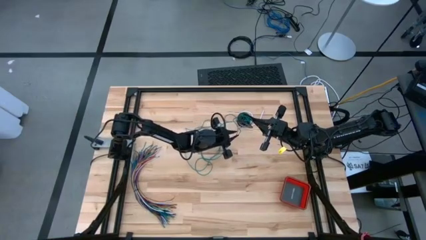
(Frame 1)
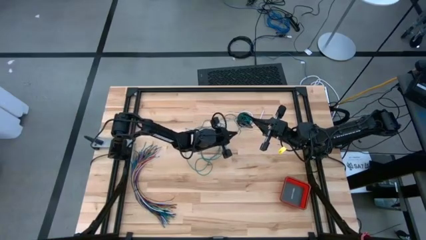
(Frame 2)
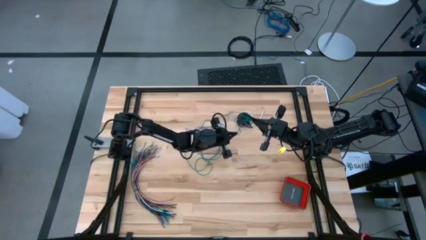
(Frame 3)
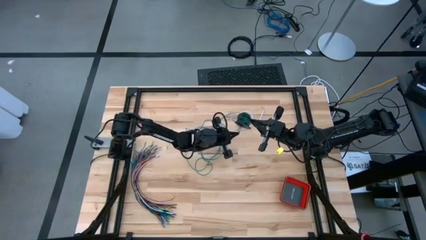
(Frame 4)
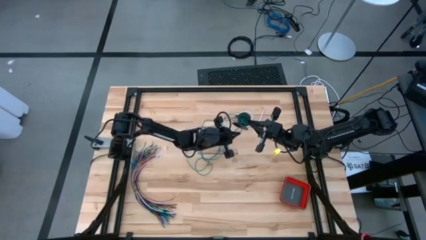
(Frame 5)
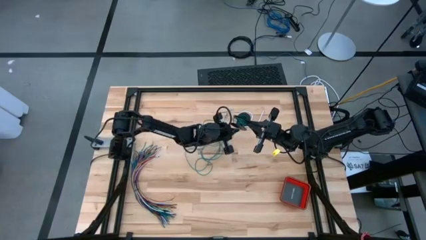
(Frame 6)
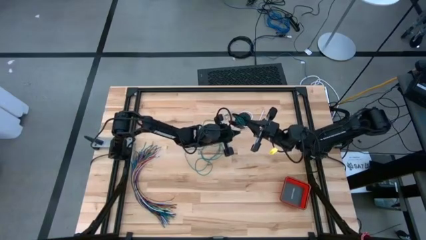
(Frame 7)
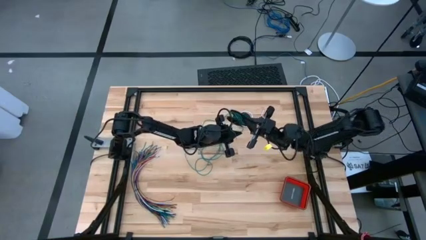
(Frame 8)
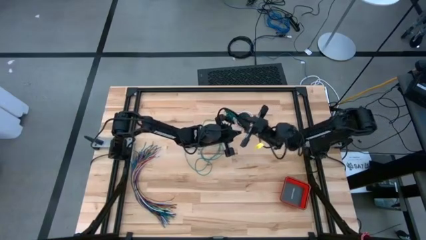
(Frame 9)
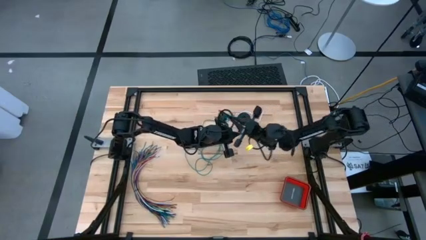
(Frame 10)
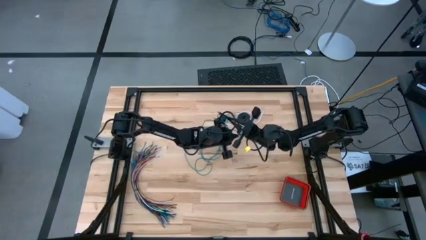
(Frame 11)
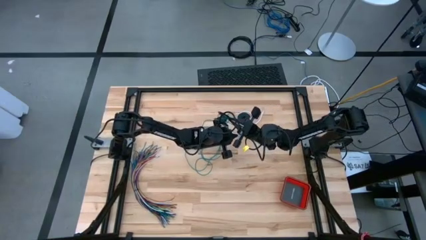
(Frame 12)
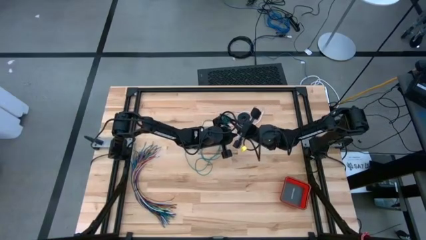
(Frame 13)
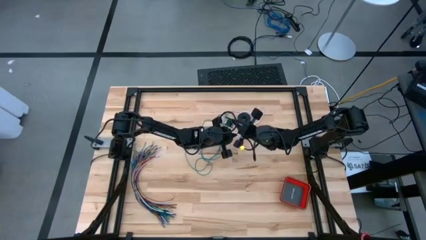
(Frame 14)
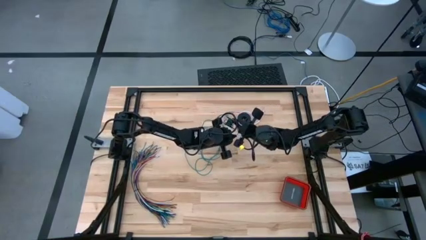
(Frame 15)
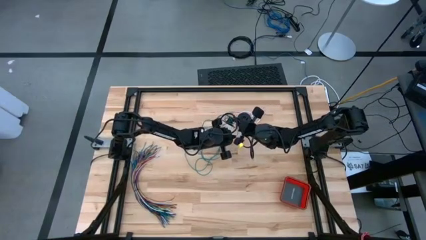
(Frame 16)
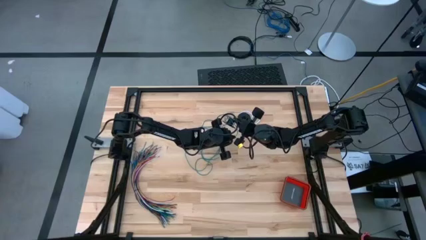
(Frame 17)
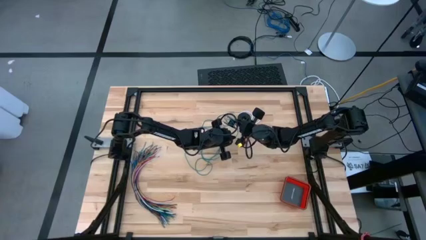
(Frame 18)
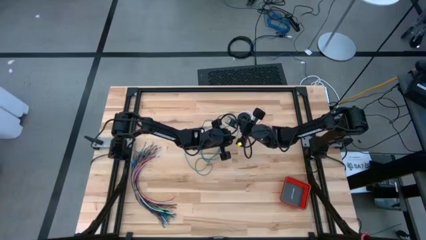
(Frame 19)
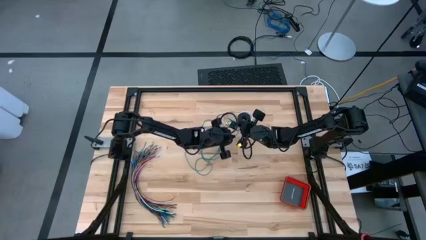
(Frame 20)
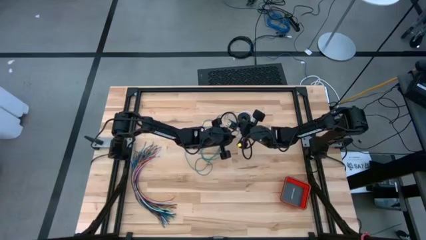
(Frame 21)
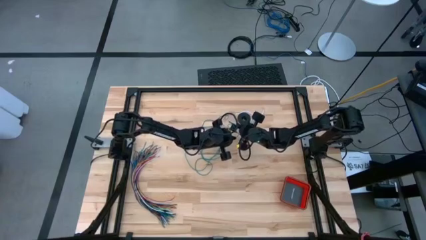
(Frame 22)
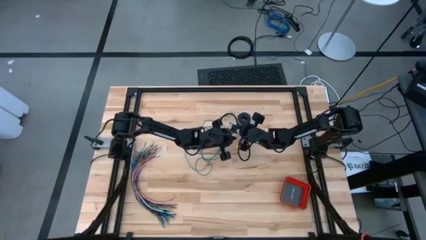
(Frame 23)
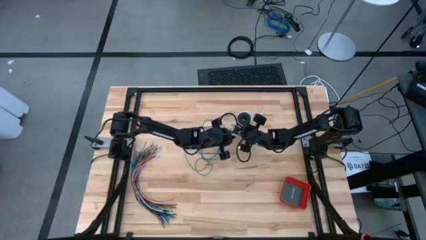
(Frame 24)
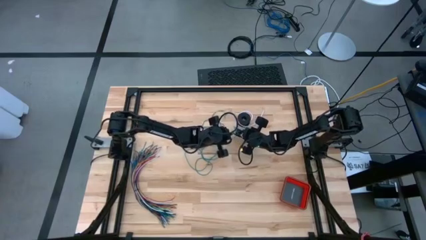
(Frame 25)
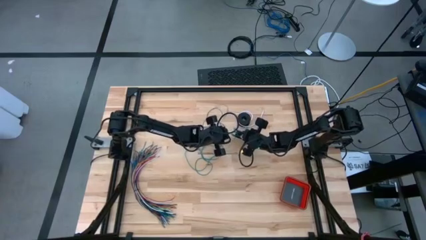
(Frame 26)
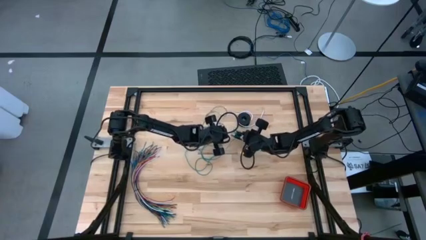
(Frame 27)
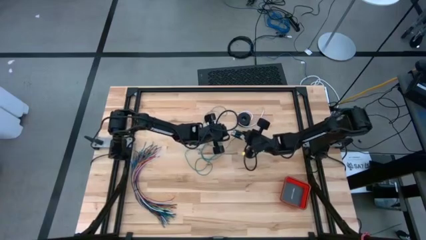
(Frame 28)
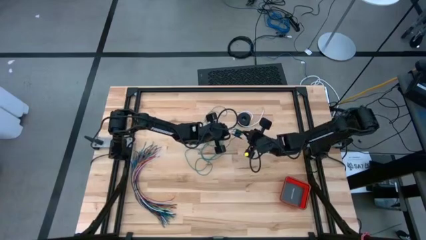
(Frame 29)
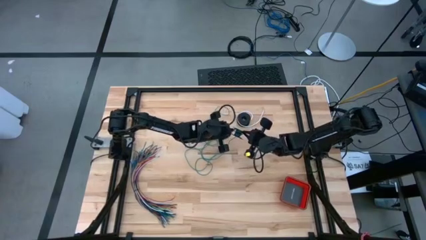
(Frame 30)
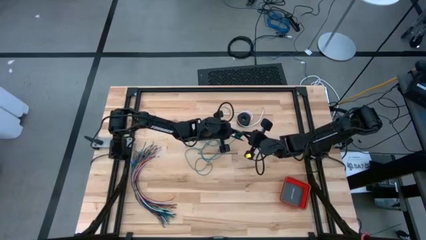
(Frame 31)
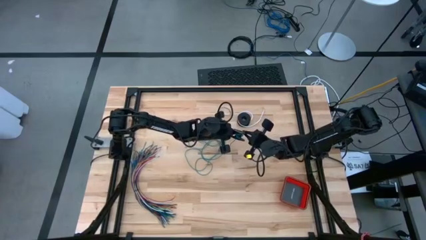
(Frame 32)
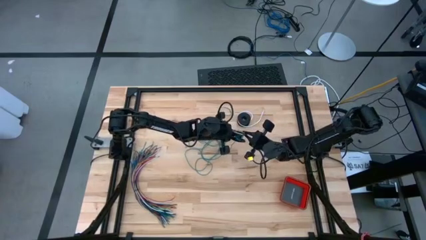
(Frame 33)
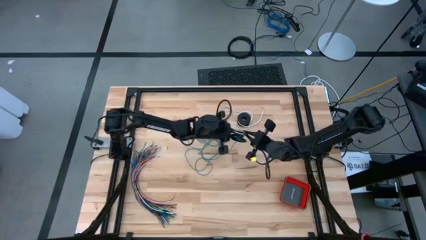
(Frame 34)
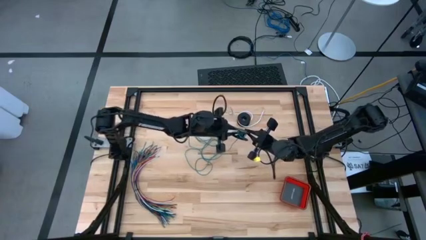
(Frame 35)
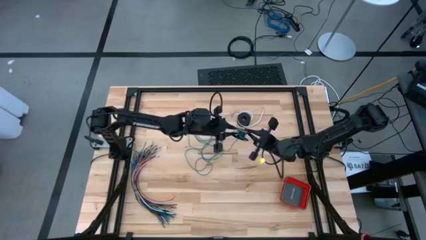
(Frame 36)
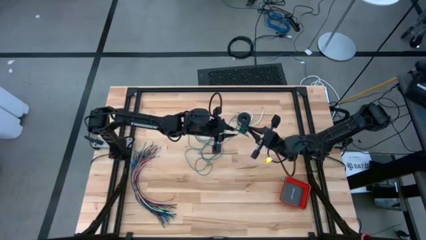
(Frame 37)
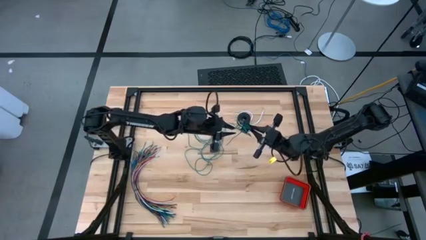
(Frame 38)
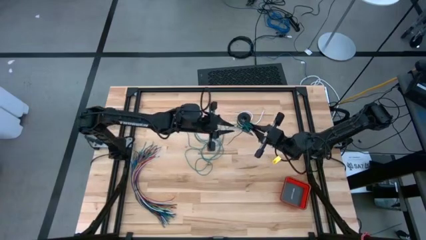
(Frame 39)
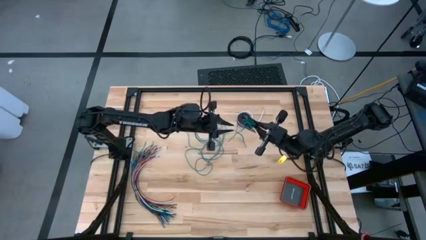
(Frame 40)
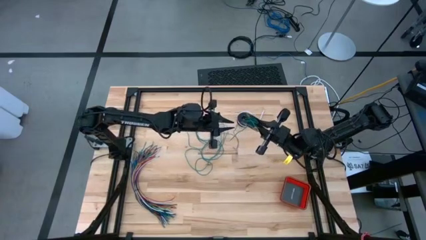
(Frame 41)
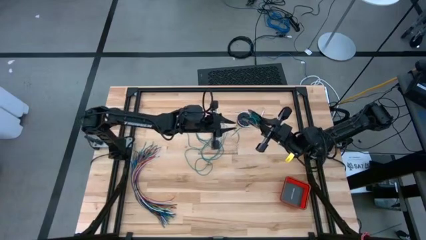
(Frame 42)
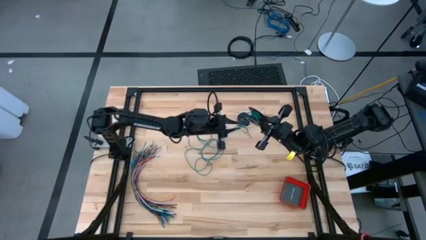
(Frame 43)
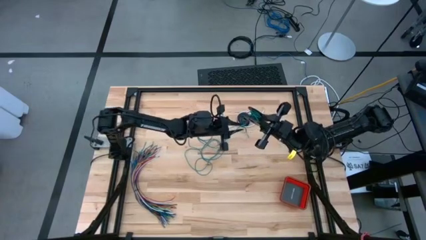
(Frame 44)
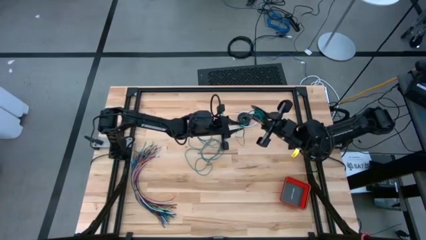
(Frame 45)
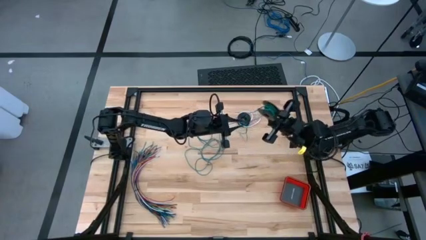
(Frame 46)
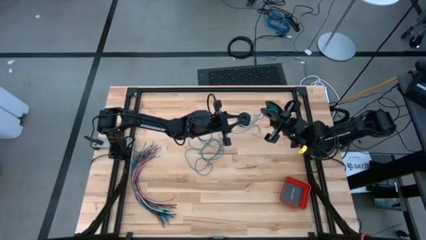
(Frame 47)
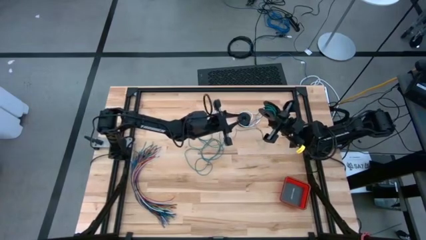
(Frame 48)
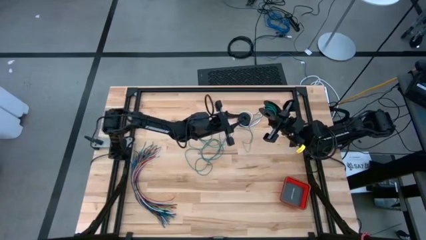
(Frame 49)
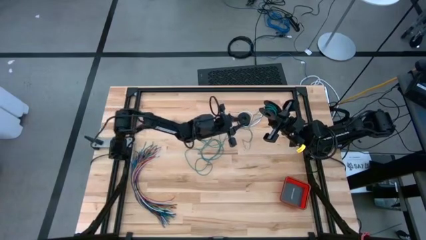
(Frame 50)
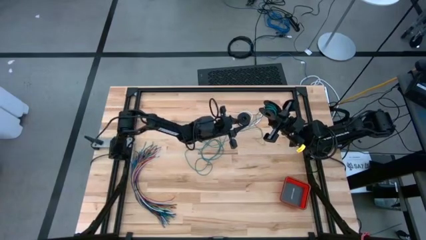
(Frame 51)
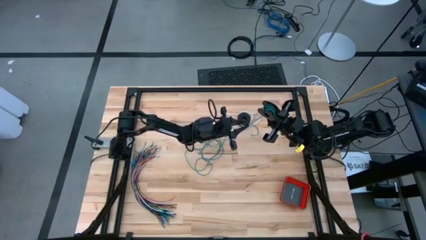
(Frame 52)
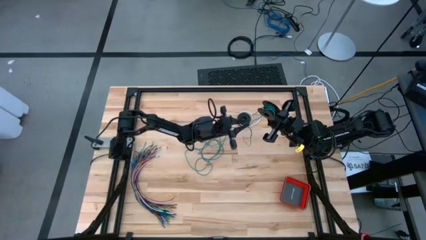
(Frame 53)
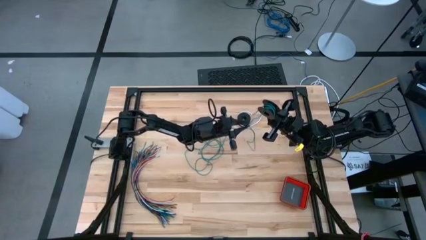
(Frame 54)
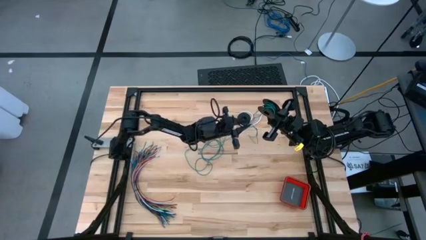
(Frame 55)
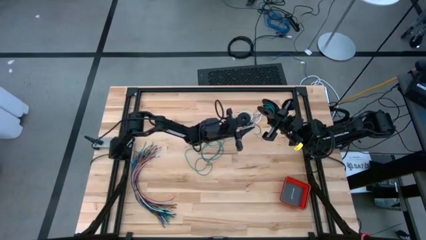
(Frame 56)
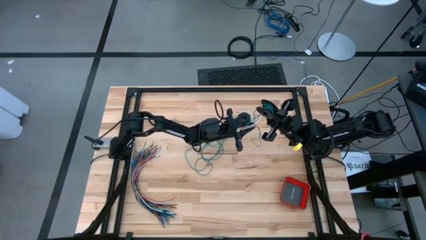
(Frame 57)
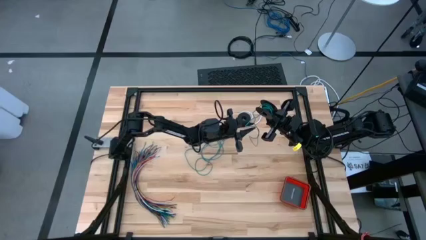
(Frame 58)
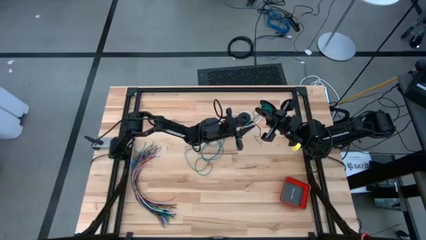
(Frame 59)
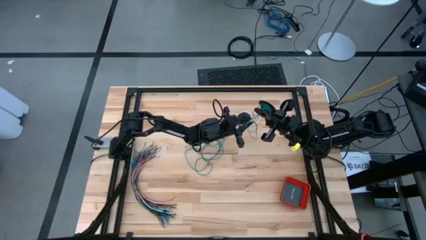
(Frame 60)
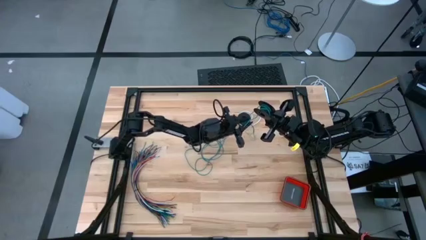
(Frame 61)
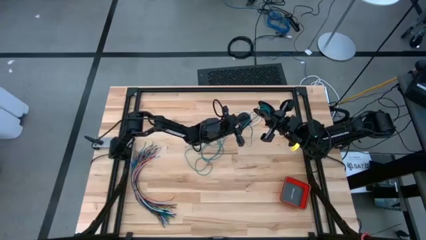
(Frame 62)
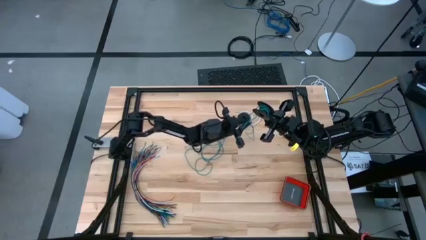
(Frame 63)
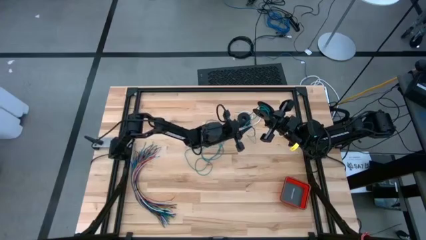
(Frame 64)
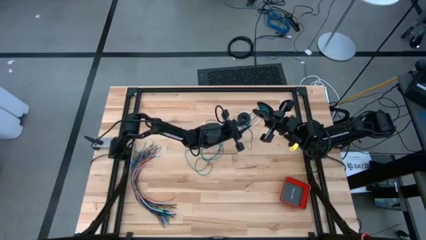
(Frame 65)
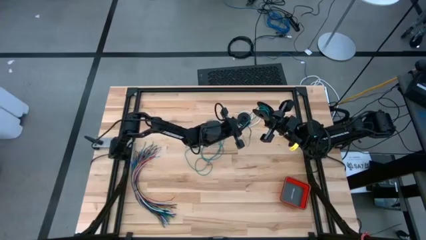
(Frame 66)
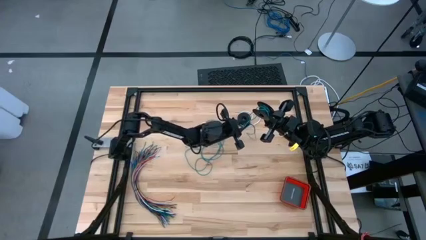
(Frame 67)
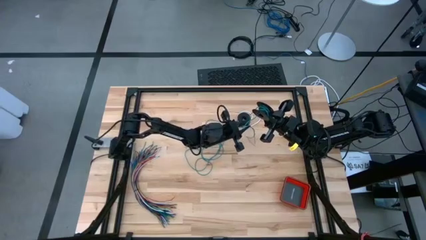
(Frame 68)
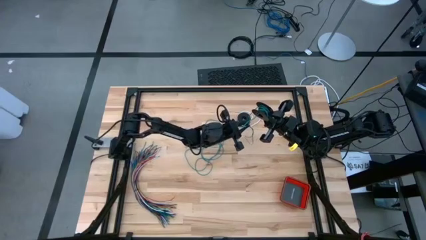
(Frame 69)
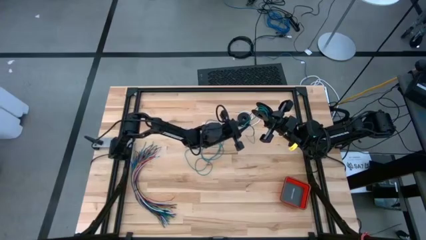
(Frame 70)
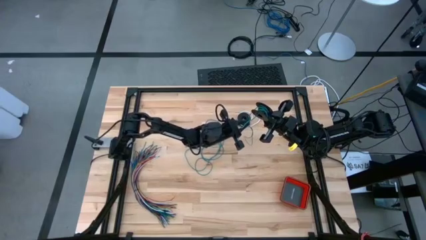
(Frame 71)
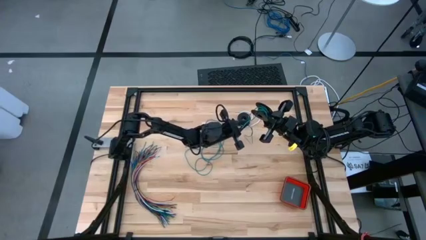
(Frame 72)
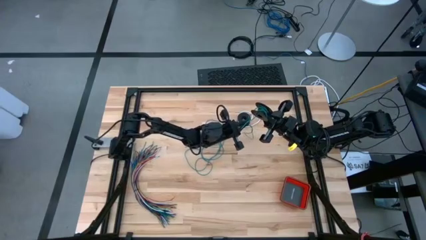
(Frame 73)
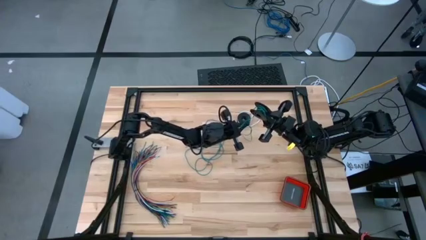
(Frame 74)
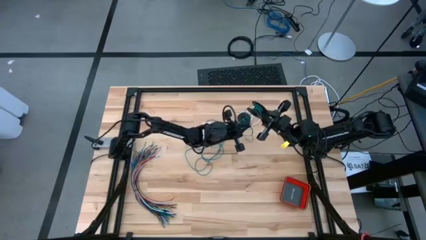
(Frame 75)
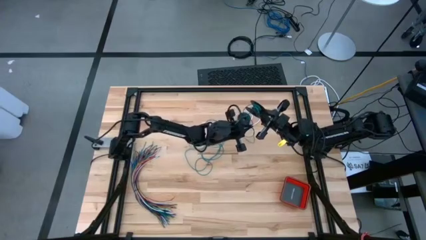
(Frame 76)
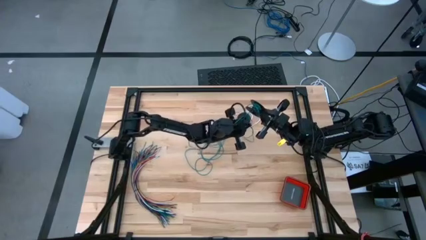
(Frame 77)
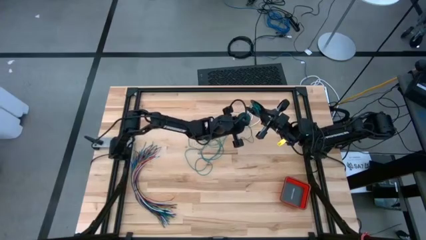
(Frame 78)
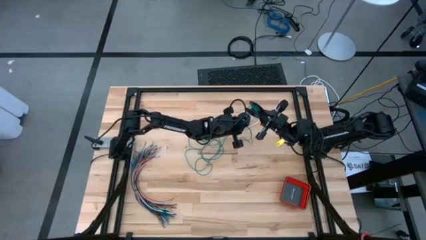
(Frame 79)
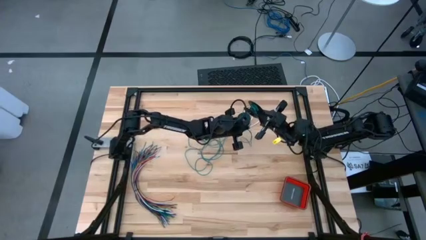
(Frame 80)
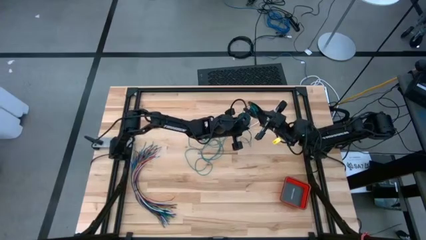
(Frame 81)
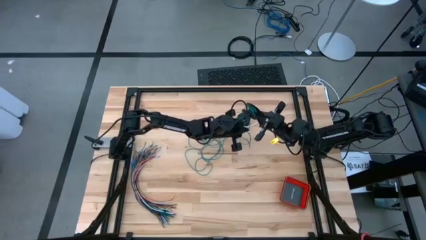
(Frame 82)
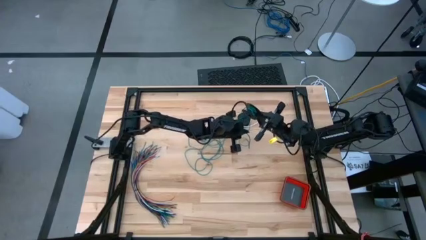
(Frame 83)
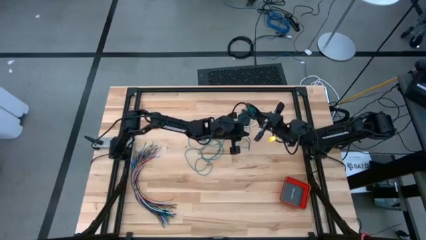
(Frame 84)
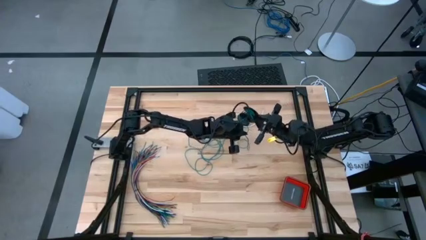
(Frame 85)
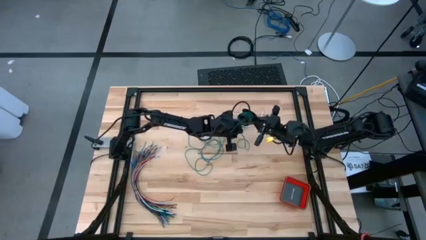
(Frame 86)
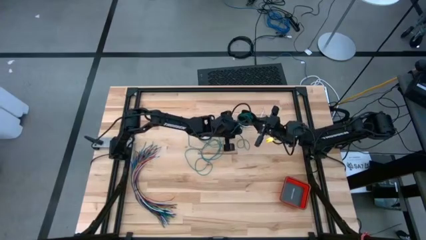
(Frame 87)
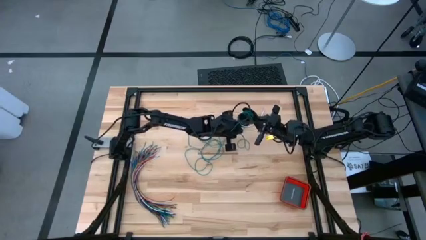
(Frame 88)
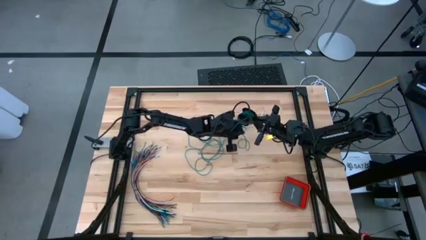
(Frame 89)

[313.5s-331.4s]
Task: Coil cords
Coil the green wire onto the spool
